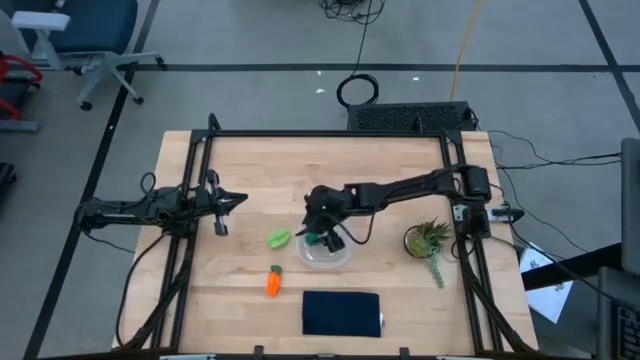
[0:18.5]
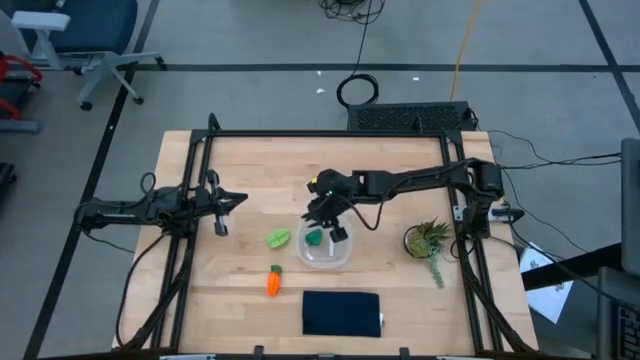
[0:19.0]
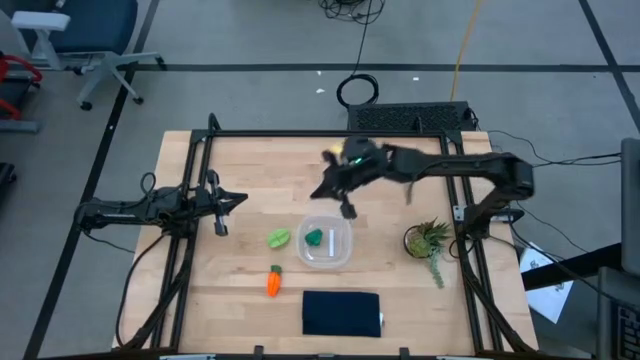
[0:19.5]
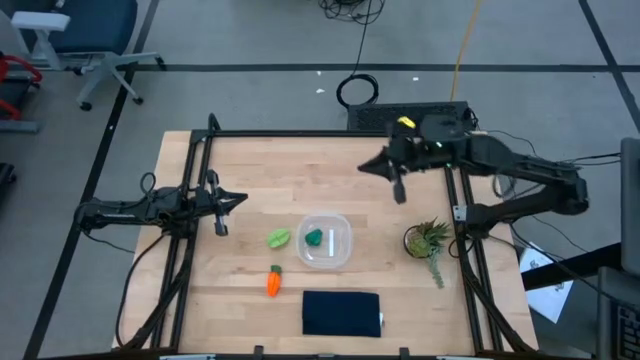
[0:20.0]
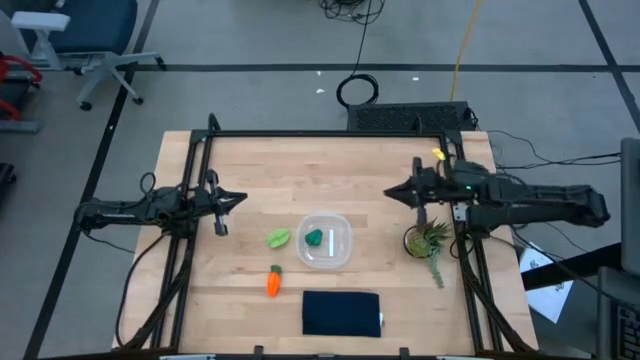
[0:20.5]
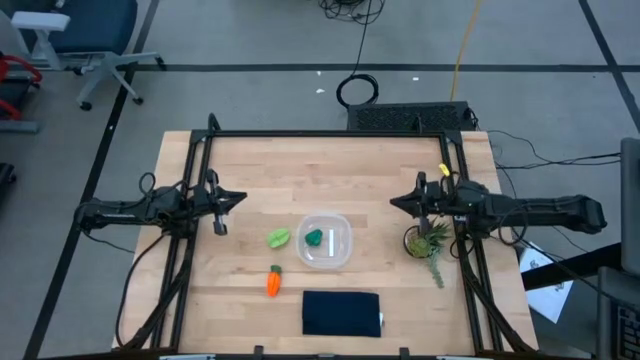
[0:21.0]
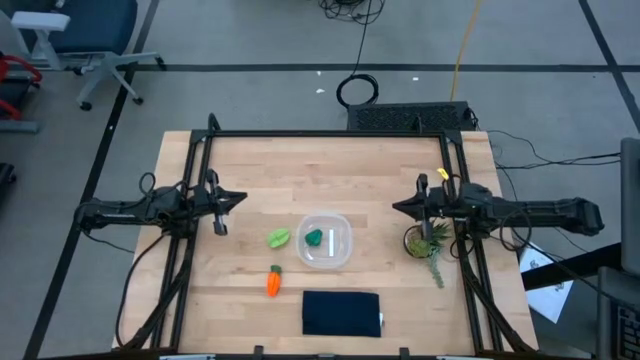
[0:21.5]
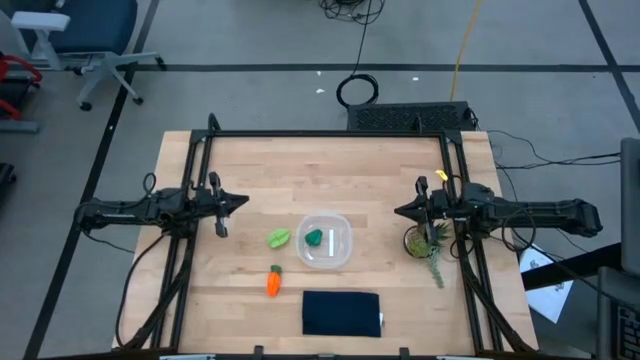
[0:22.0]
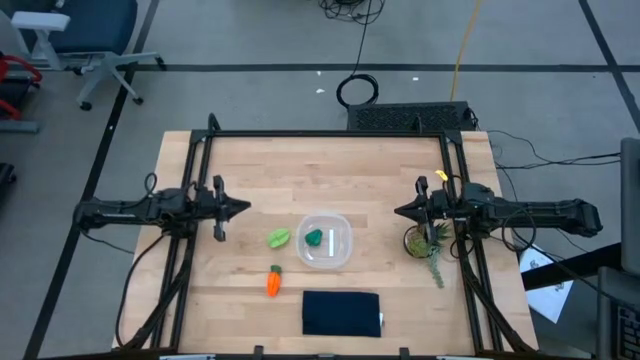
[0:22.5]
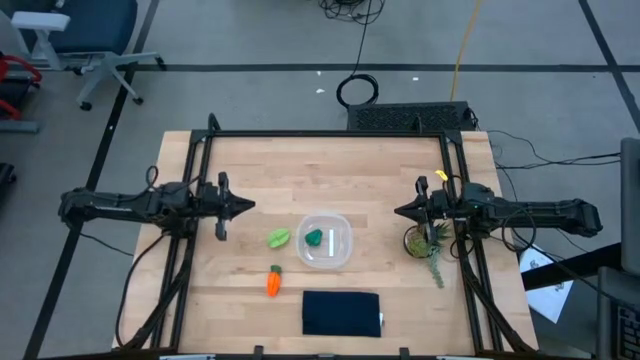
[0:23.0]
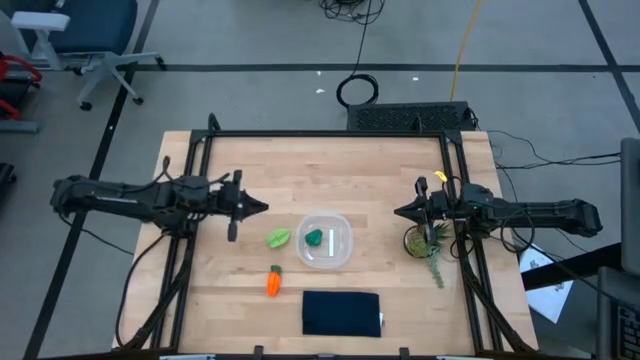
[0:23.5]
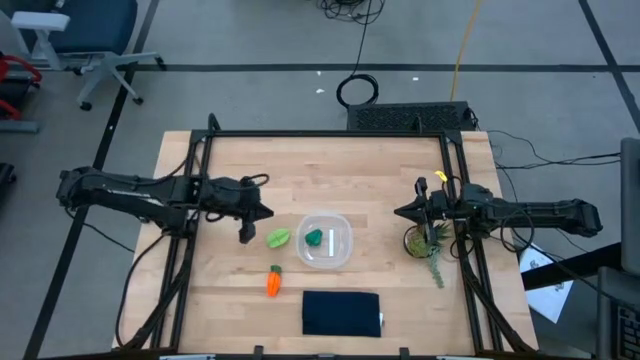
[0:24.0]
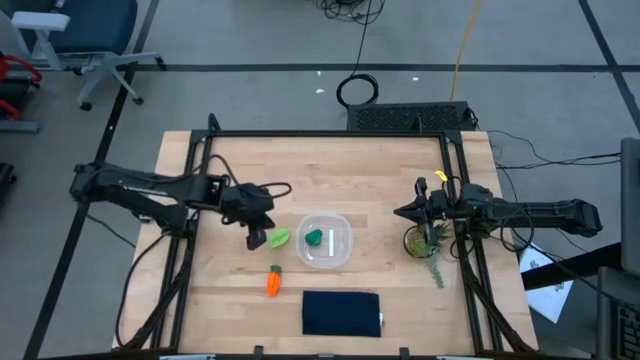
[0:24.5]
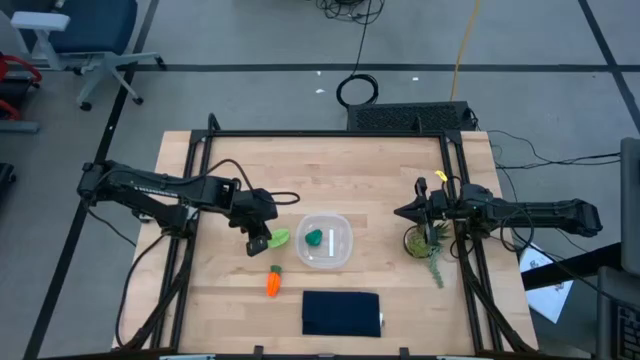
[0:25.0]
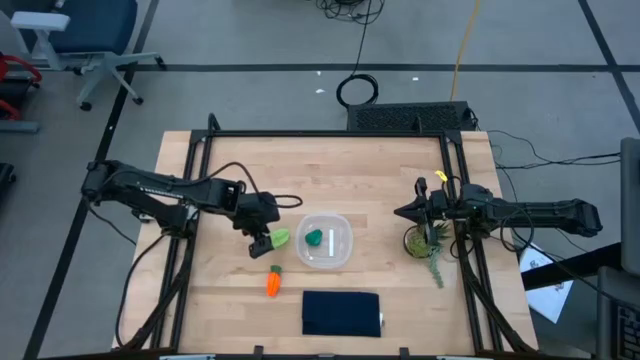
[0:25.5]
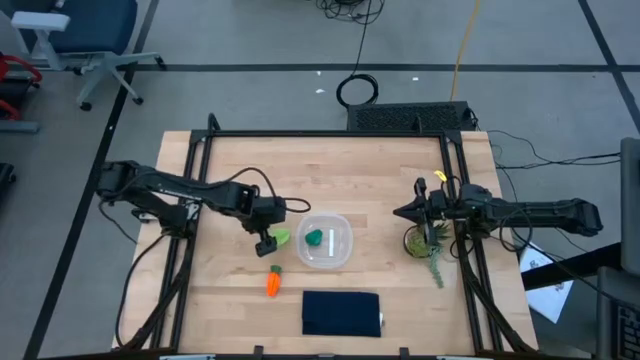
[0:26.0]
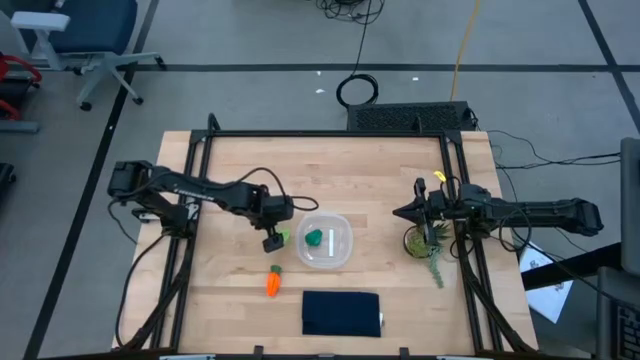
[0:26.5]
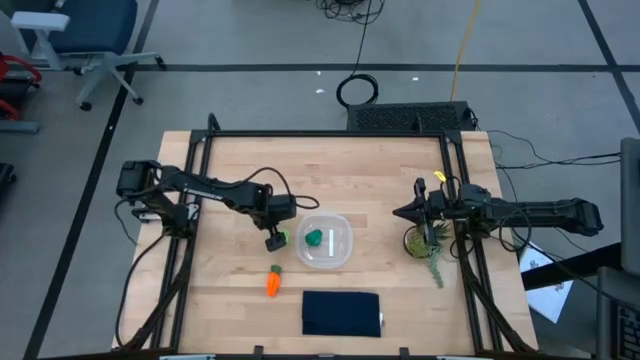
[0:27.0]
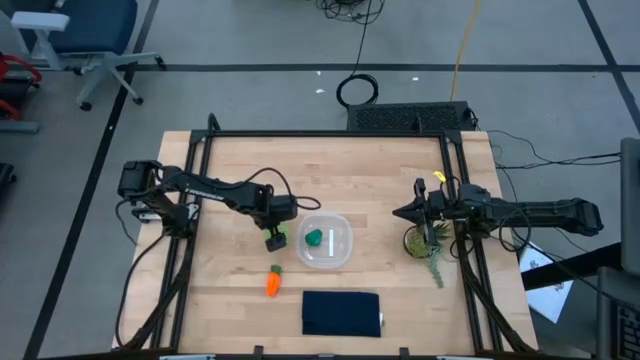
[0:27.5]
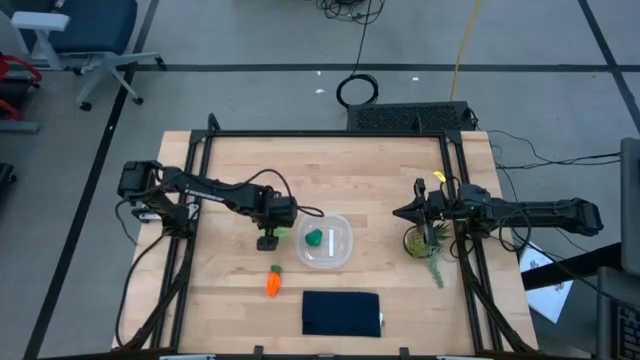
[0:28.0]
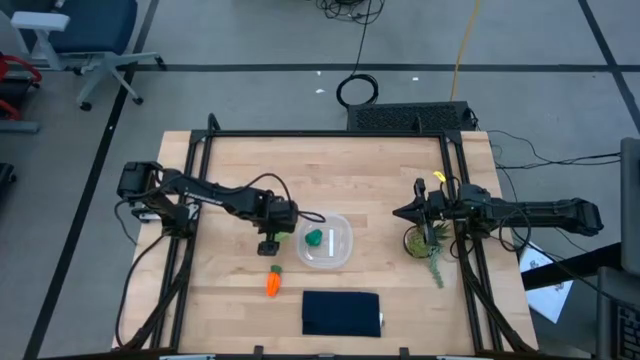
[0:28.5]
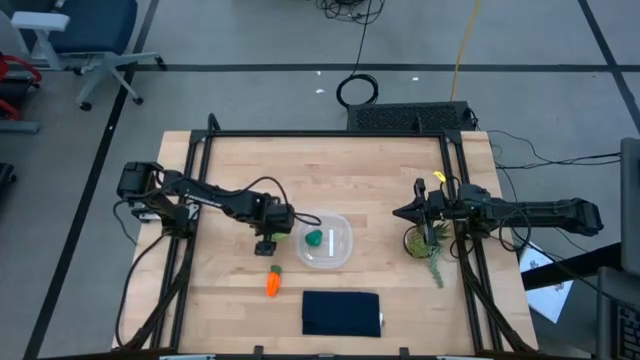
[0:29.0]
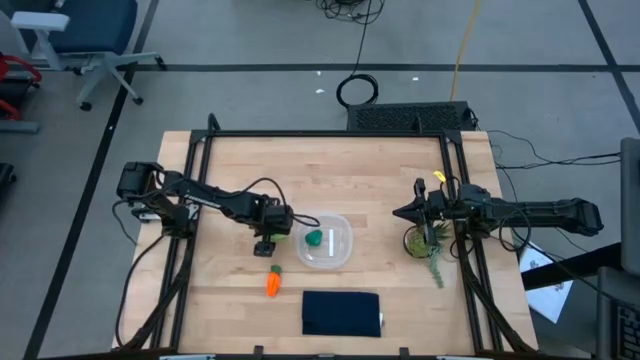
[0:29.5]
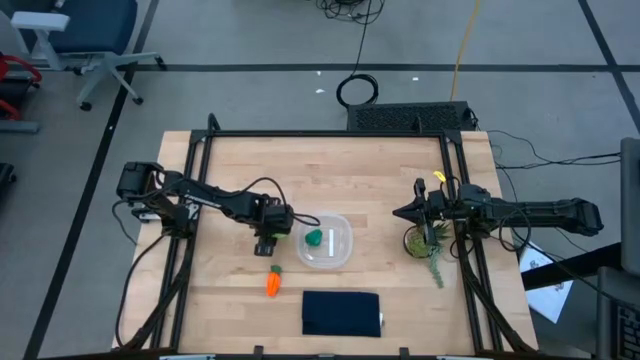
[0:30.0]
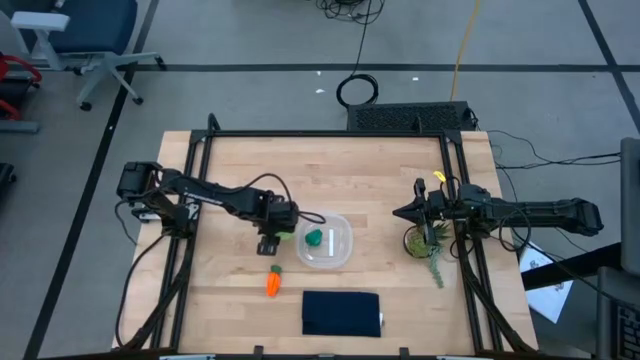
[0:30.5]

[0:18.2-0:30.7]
Task: Pick and placing Produce into tupperware
Put the green starfruit into the bin

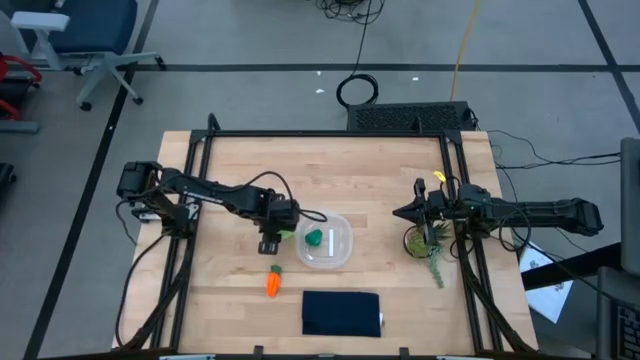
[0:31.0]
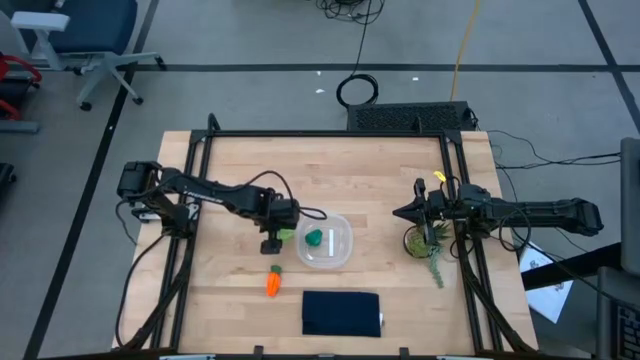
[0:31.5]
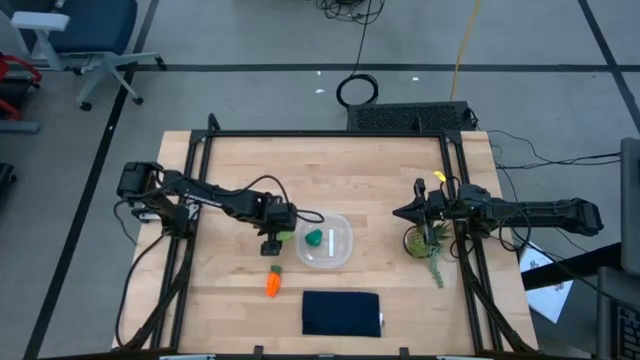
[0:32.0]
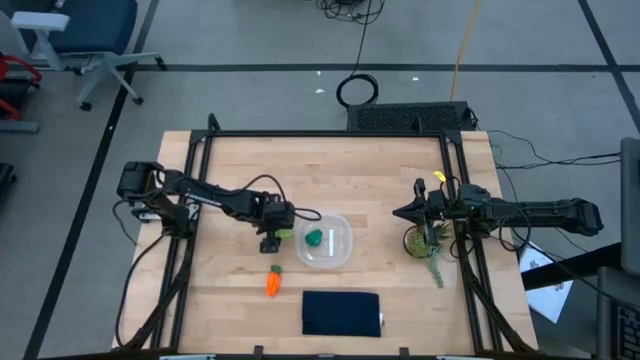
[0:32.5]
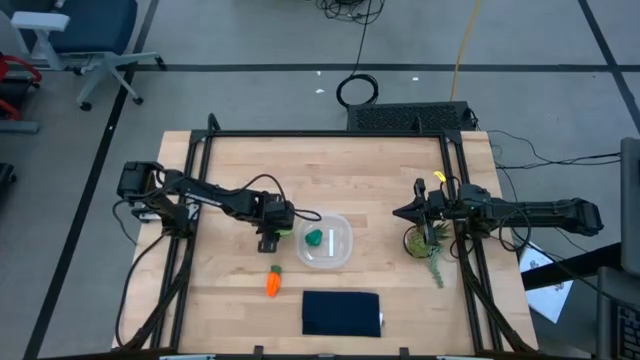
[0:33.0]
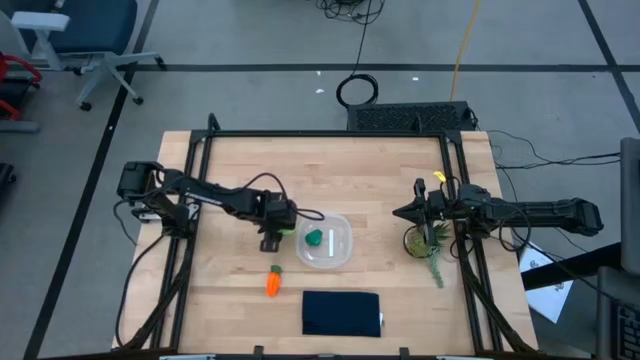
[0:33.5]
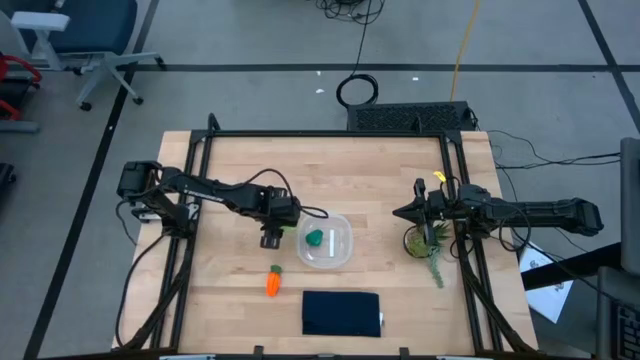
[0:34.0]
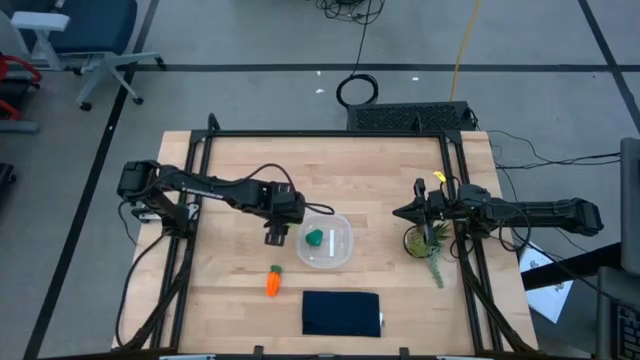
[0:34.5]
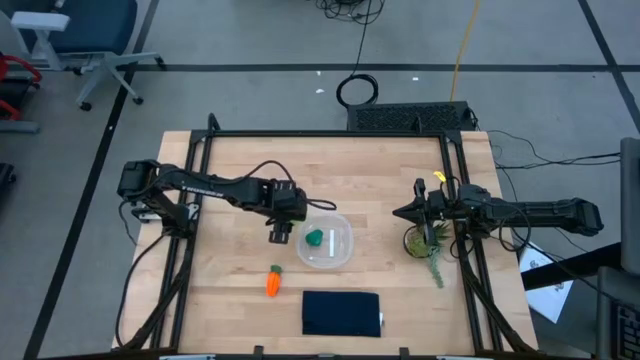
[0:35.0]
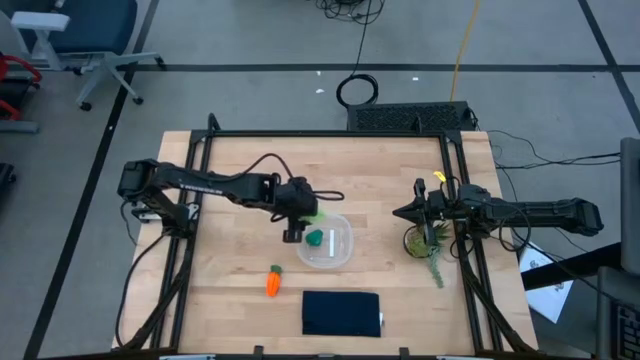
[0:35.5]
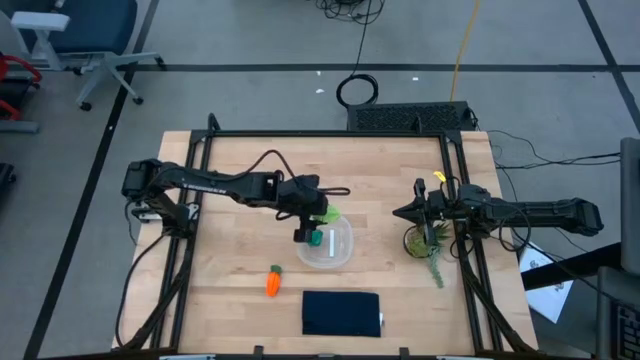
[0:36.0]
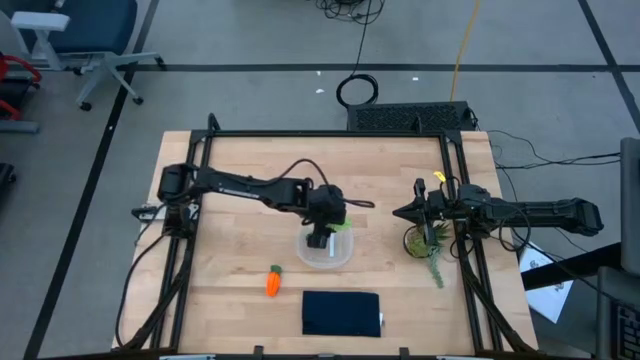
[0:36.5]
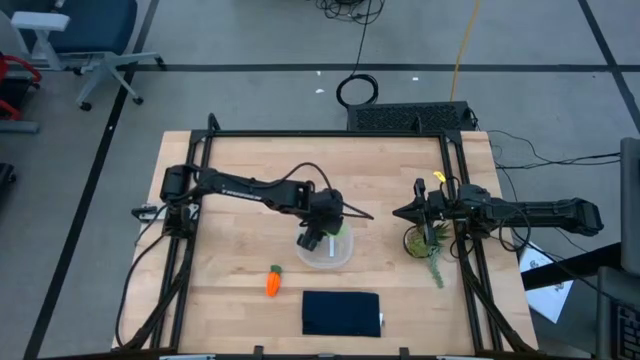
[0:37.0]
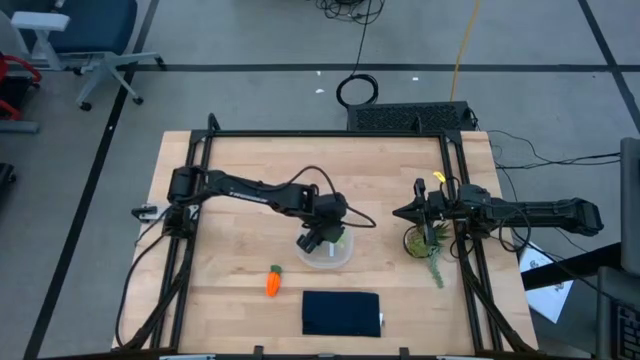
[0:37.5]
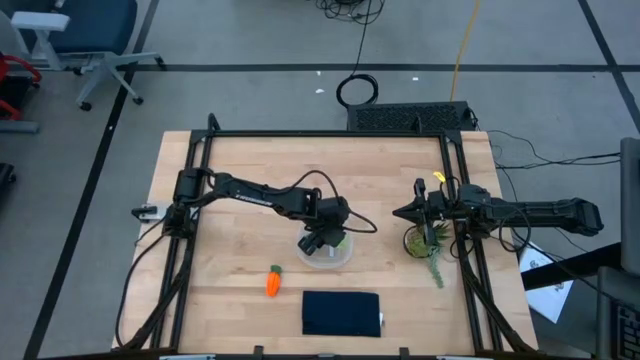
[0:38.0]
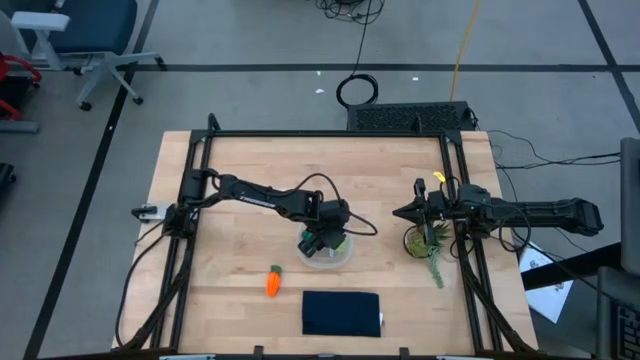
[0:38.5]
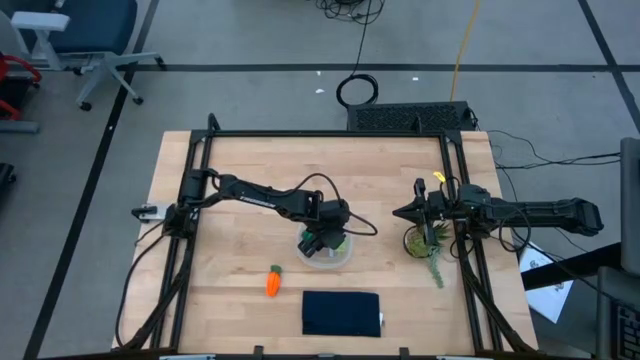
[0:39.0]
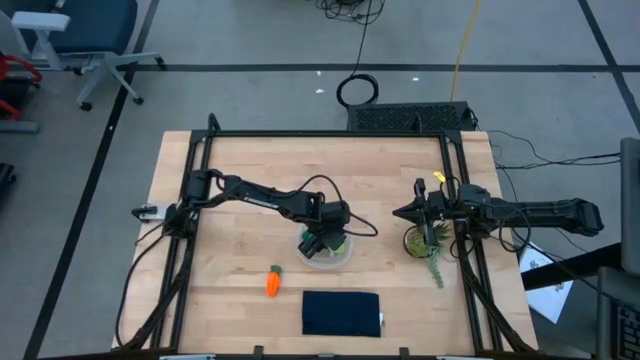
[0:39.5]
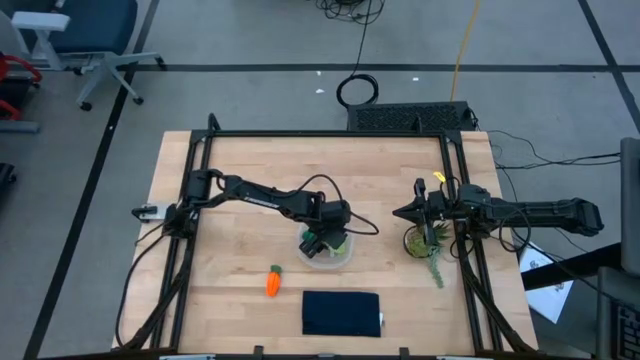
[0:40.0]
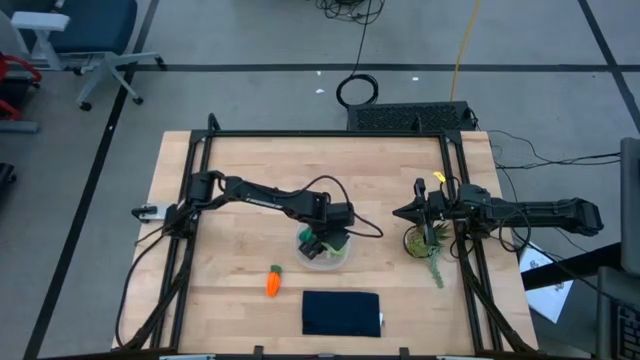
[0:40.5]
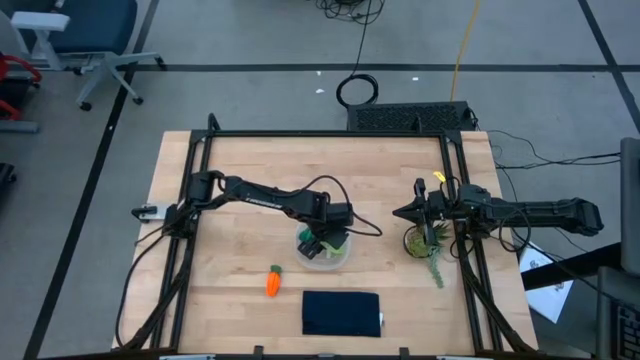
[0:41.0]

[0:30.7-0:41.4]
Put the green starfruit into the bin
